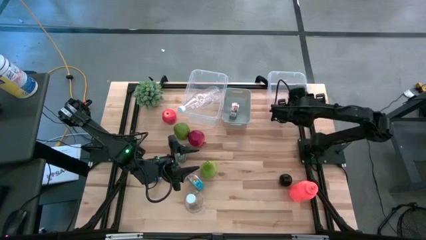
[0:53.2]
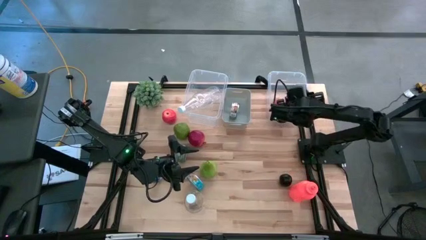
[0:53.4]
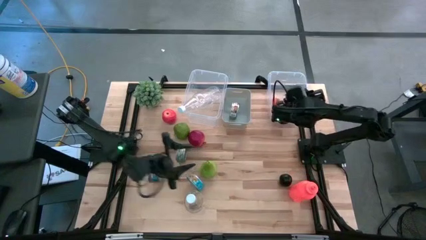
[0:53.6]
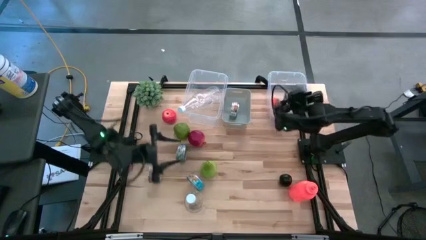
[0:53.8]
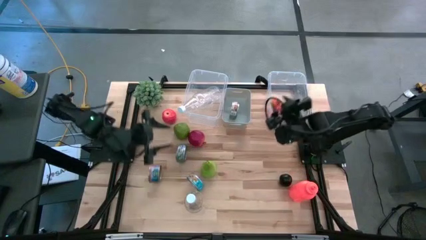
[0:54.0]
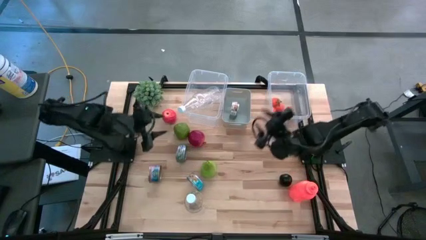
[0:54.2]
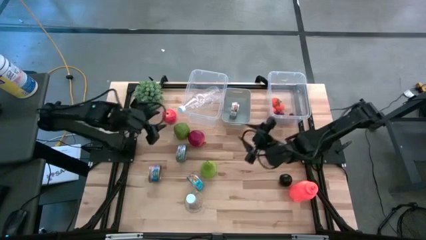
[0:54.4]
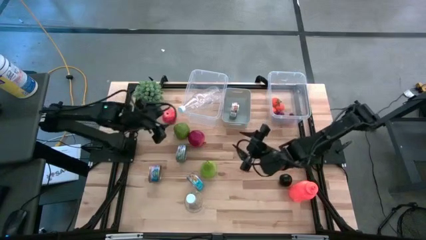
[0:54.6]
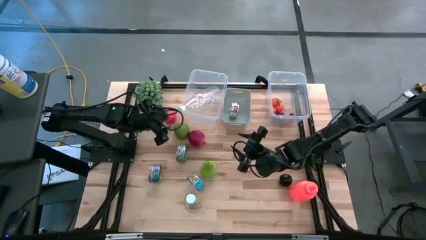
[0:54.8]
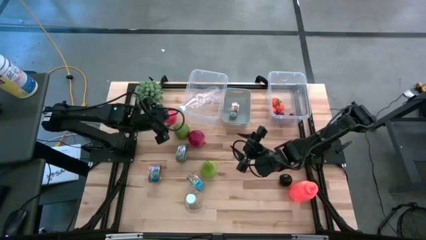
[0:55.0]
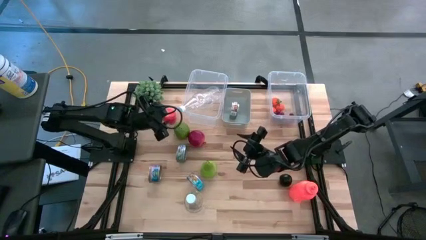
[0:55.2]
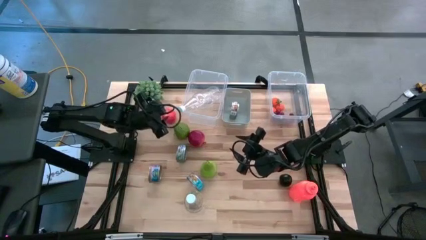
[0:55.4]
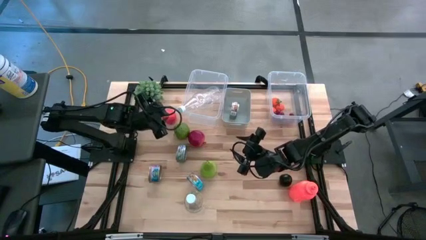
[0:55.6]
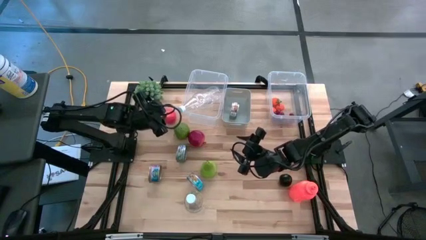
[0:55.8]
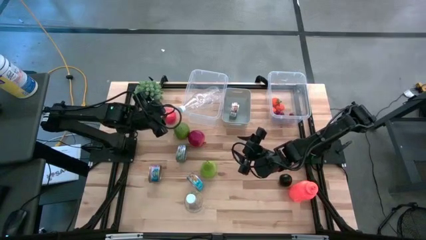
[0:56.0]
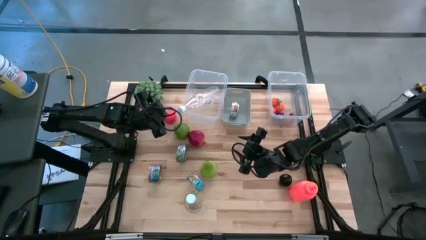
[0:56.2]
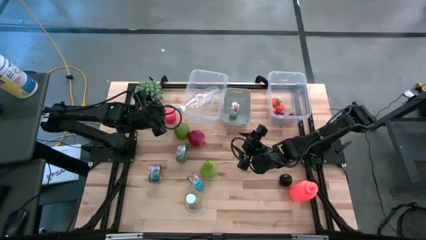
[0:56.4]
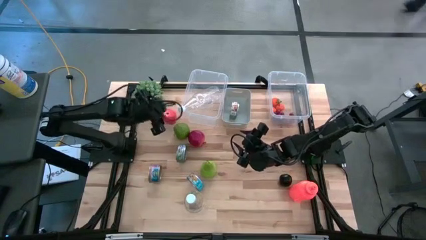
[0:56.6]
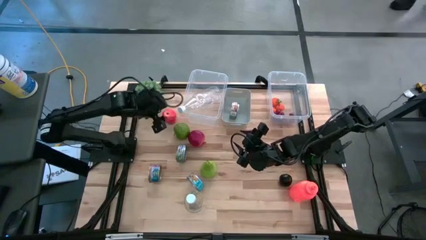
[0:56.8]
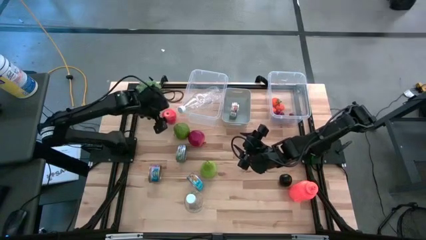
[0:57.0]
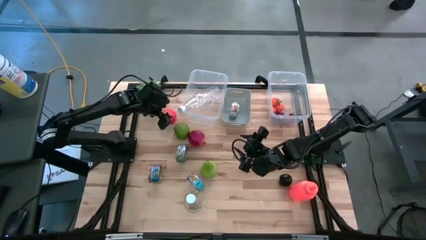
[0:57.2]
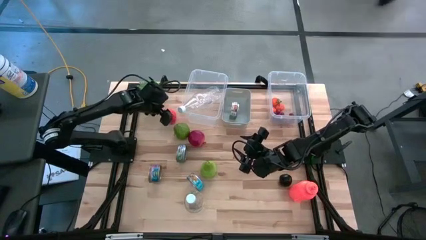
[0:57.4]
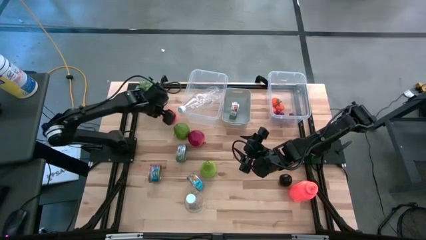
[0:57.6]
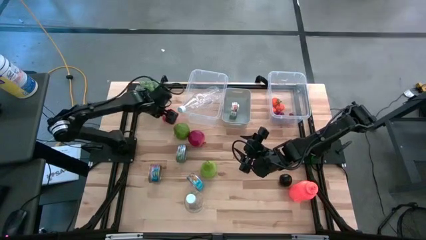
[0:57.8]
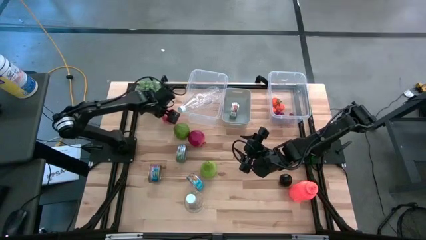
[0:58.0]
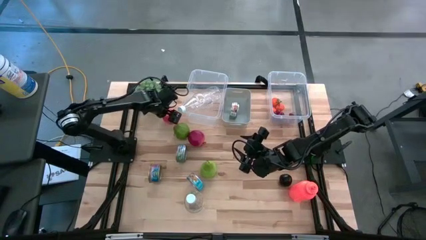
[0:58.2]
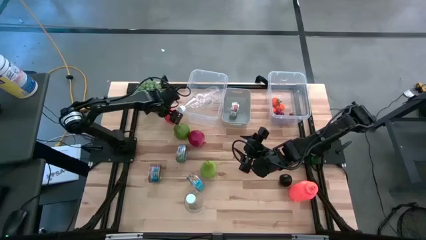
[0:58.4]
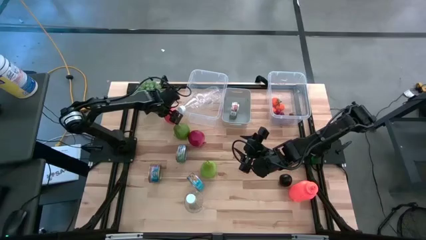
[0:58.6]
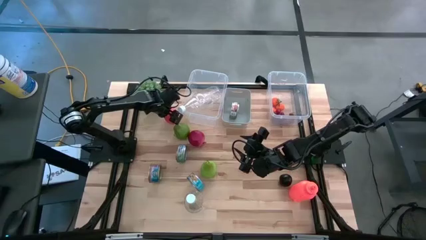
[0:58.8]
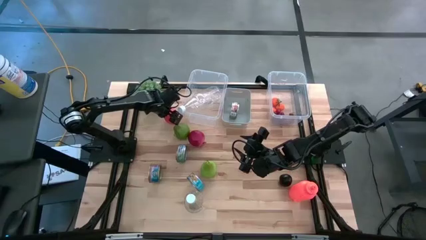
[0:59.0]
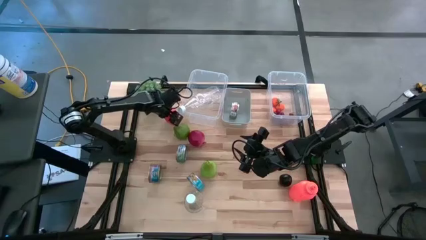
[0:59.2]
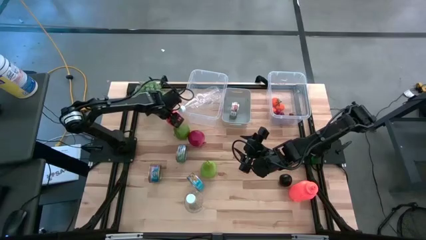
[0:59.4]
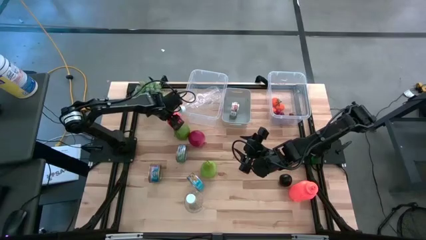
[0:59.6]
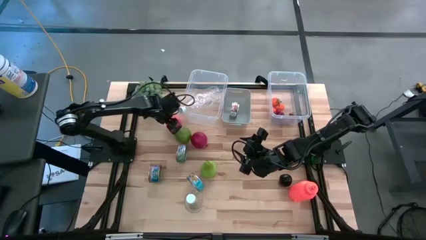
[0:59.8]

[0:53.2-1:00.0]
Task: Pick & Place Food Item
Put the red apple into the right transparent bin

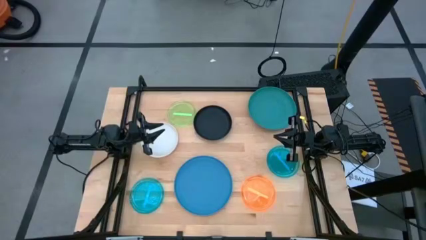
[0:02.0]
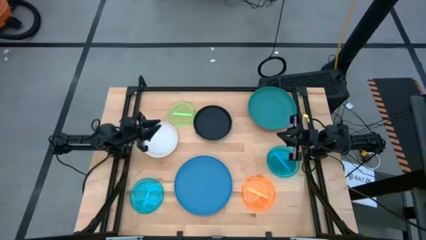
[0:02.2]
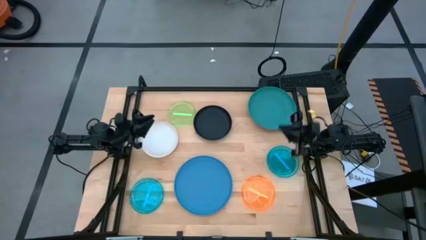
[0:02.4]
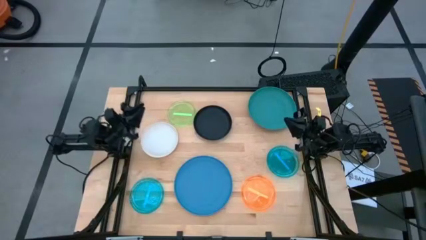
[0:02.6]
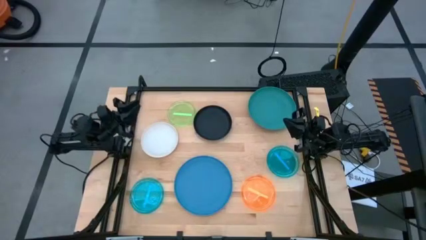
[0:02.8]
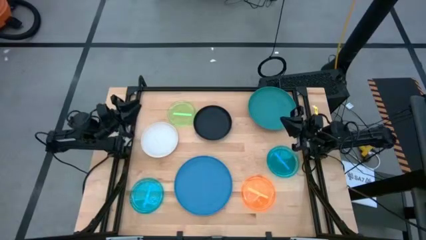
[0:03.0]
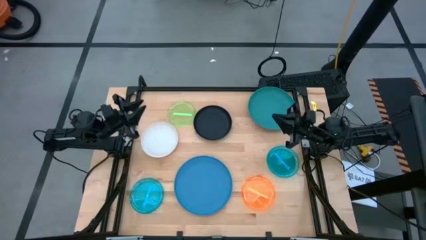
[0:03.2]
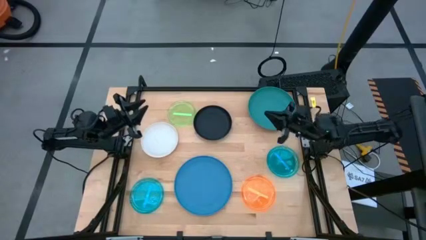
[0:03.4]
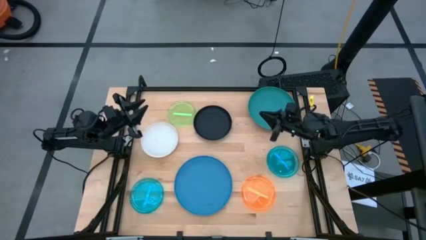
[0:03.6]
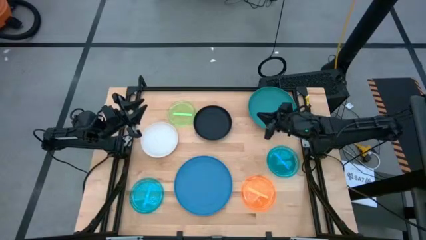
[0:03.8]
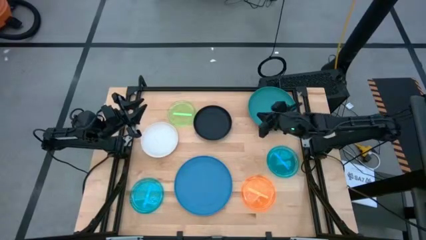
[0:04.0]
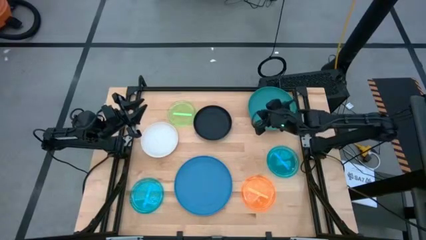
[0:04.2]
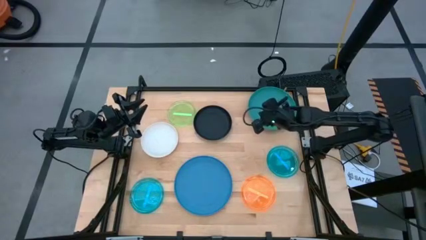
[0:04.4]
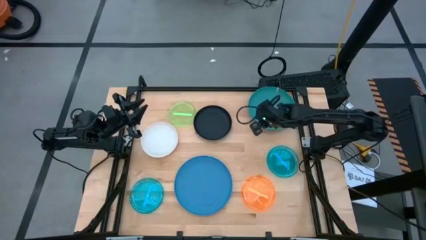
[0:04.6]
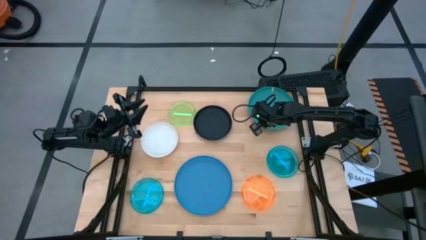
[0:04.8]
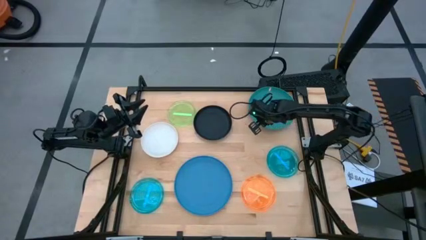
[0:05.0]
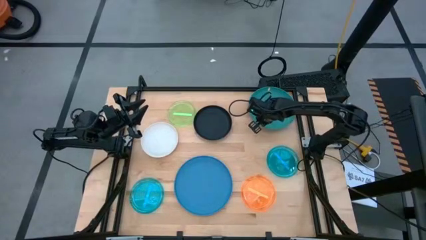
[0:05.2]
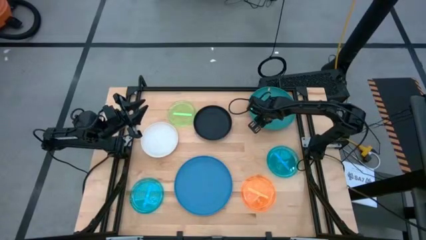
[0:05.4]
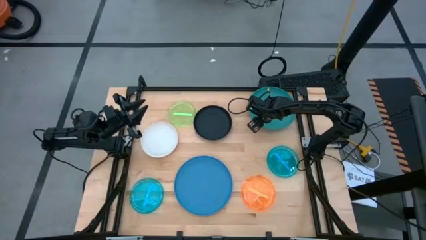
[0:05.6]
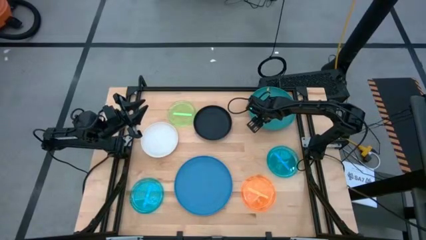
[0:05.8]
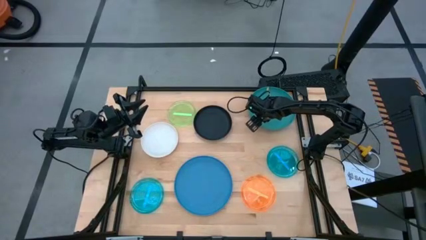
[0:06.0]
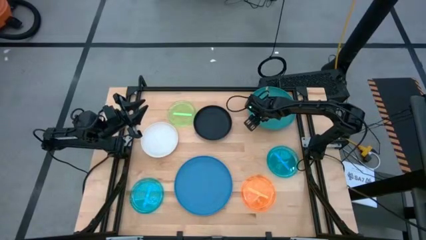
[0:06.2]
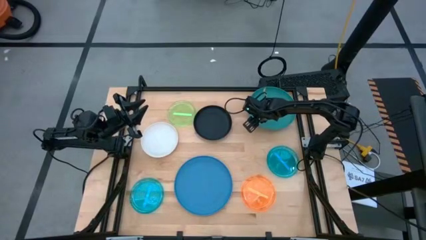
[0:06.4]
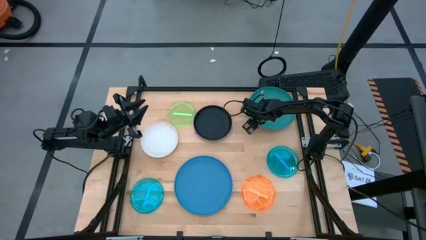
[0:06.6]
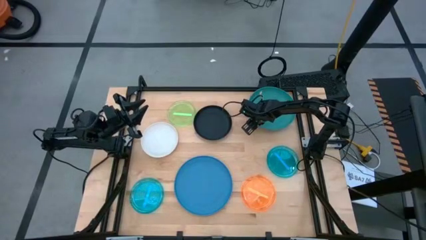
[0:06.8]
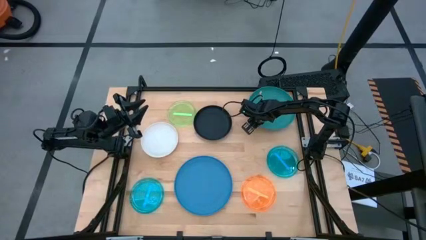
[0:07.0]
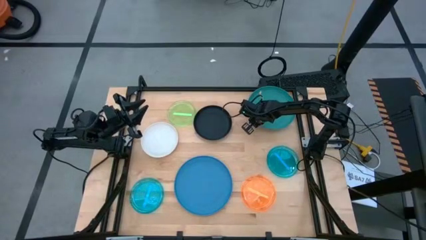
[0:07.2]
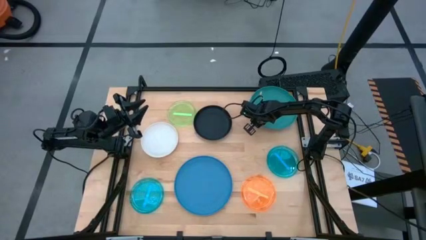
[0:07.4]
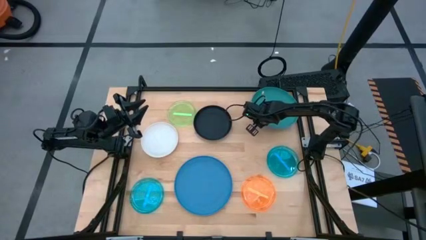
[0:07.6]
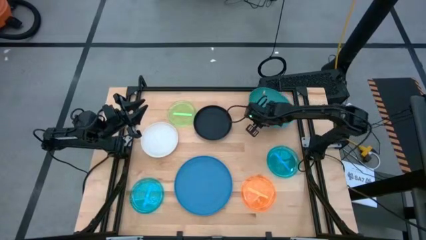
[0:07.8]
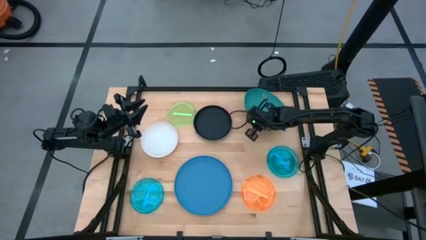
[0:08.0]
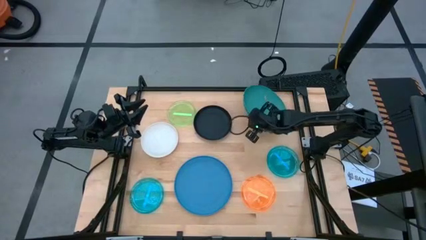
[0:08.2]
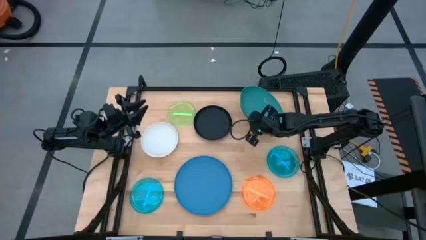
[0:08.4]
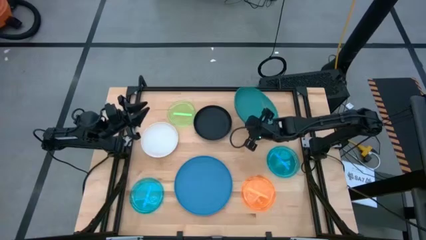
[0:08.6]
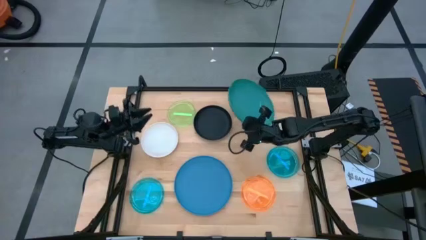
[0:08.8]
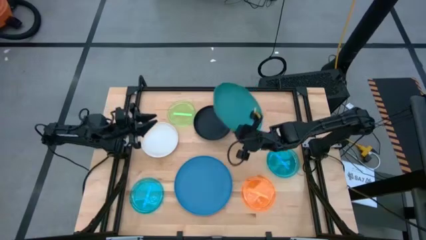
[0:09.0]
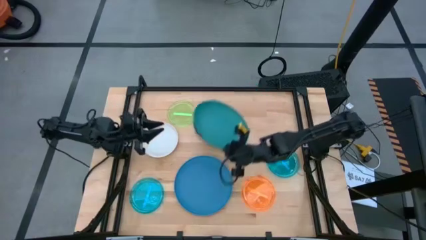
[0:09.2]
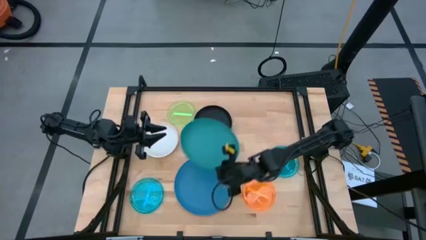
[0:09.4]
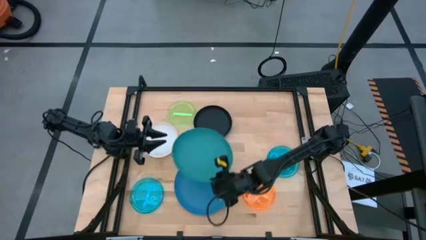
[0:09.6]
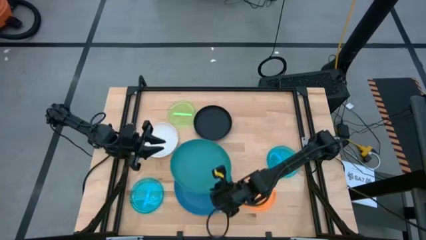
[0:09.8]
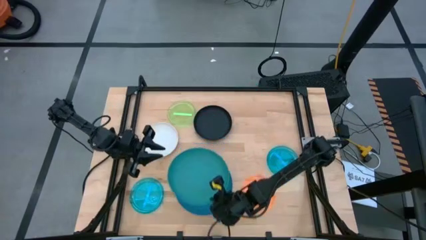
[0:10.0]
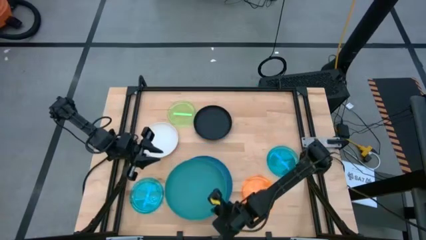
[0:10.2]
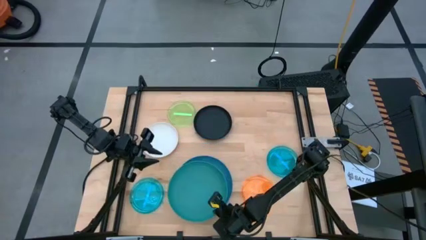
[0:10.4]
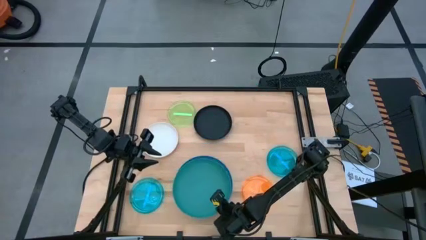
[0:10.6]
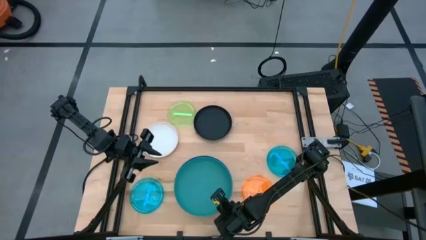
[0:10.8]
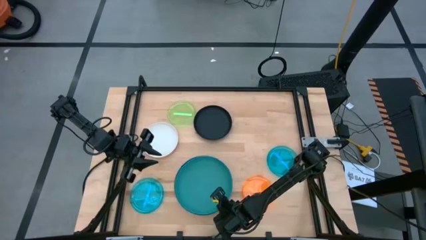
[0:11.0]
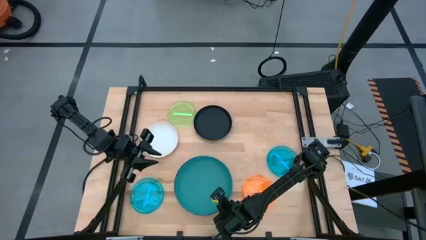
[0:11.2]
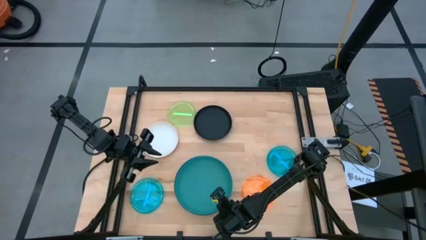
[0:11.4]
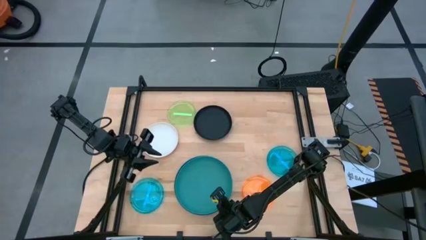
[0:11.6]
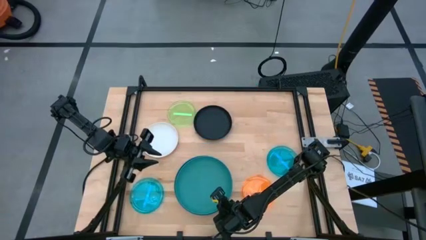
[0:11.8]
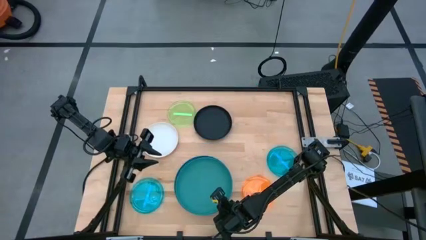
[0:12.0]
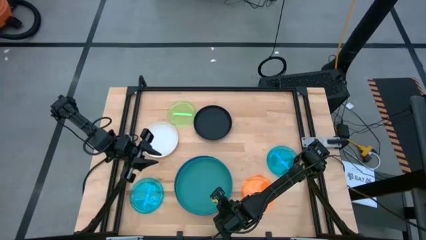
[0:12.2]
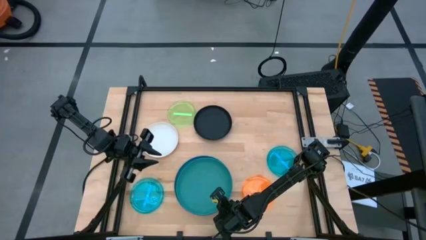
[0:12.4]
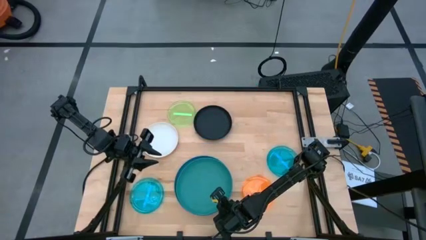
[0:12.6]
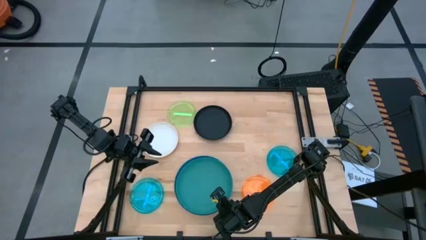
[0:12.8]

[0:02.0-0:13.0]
Task: Stack plastic plates
Stack the dark blue plate on top of the blue plate
